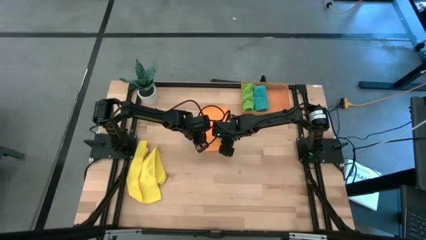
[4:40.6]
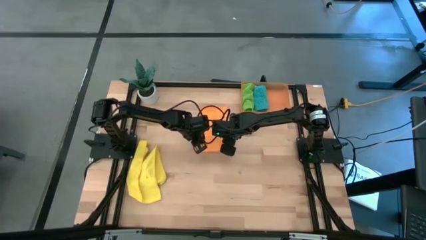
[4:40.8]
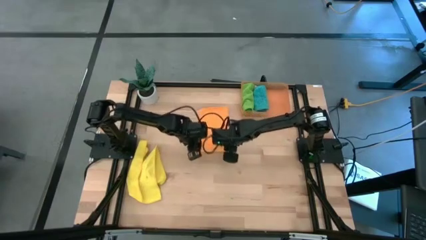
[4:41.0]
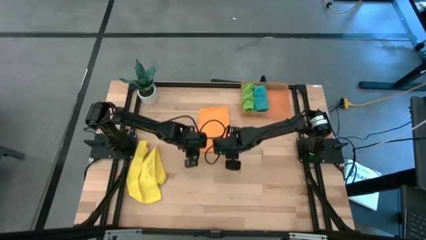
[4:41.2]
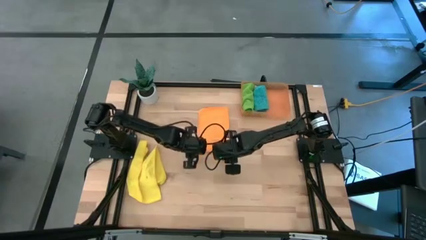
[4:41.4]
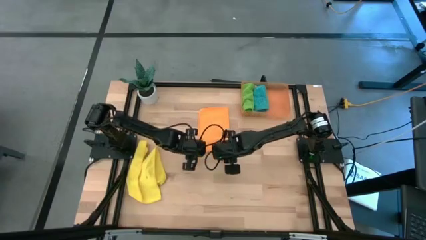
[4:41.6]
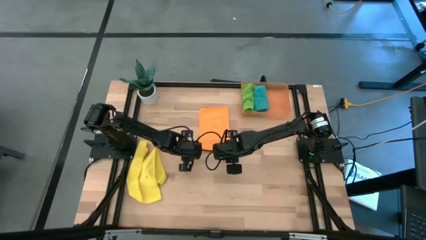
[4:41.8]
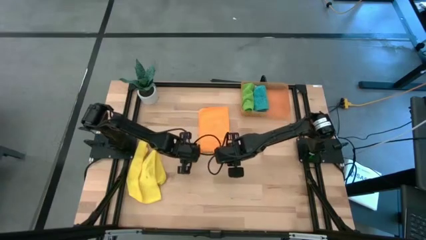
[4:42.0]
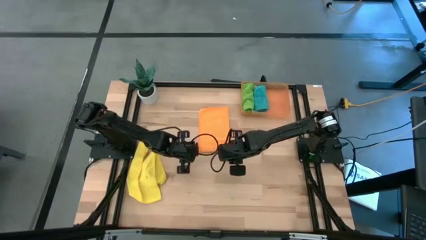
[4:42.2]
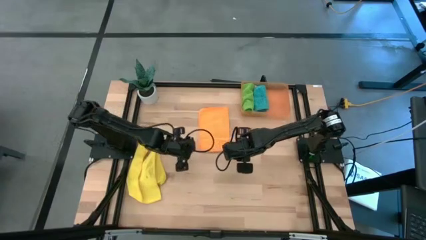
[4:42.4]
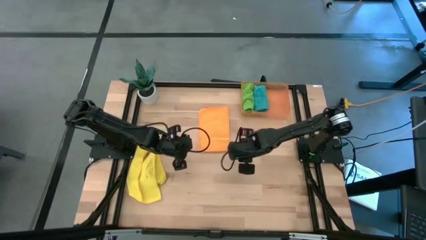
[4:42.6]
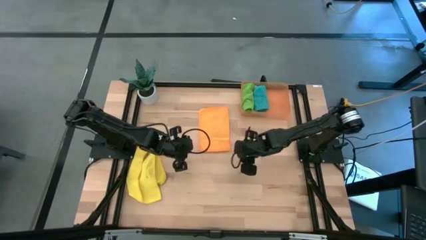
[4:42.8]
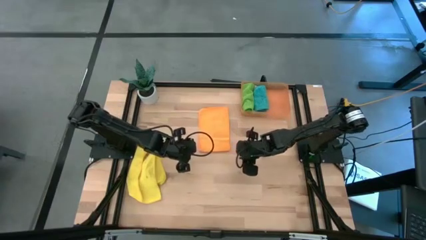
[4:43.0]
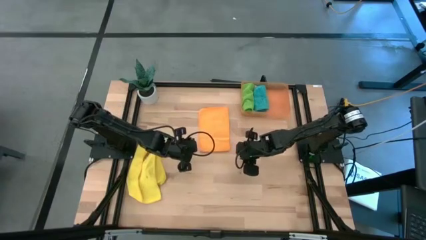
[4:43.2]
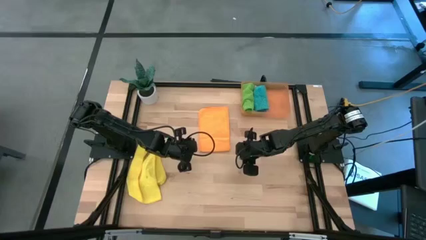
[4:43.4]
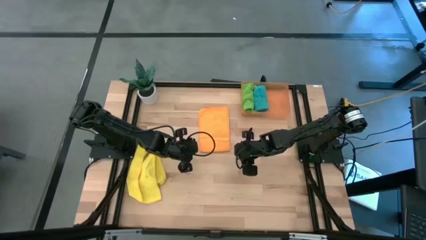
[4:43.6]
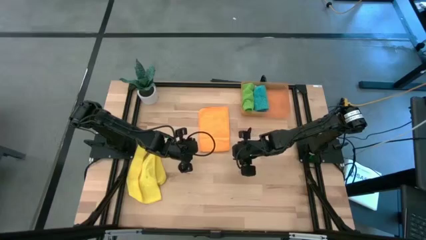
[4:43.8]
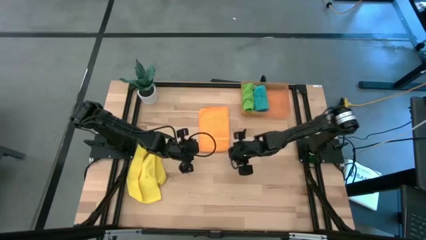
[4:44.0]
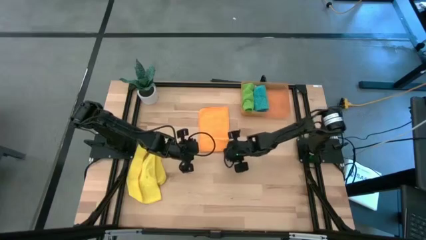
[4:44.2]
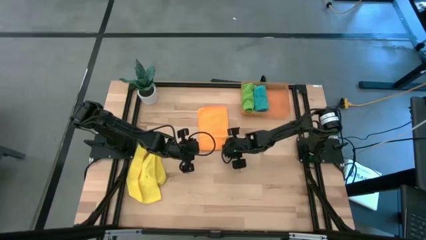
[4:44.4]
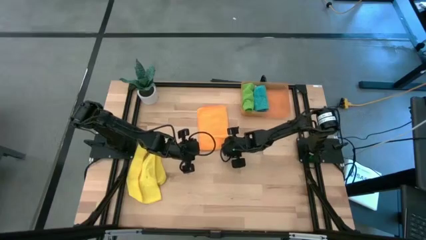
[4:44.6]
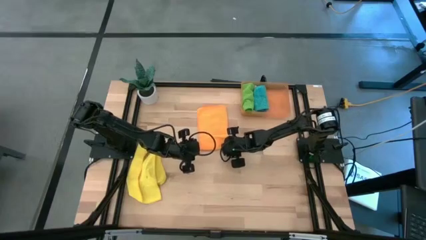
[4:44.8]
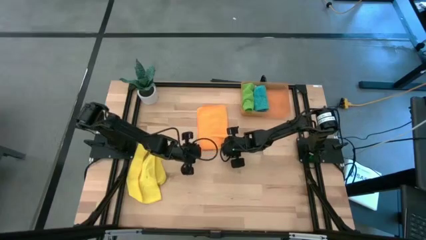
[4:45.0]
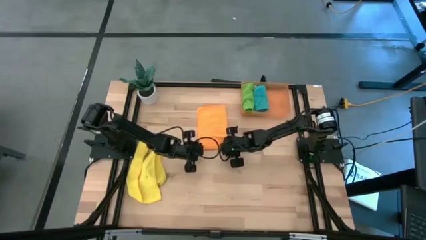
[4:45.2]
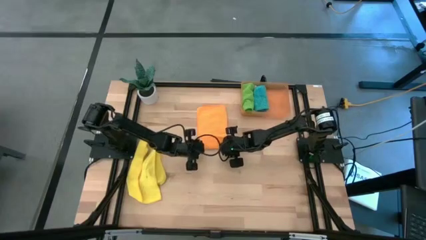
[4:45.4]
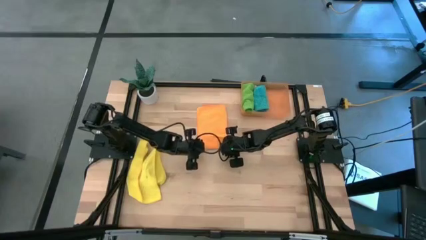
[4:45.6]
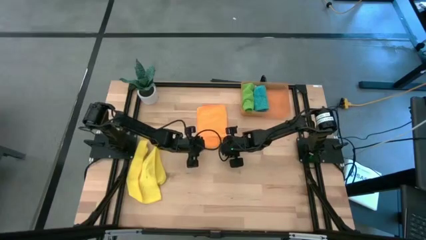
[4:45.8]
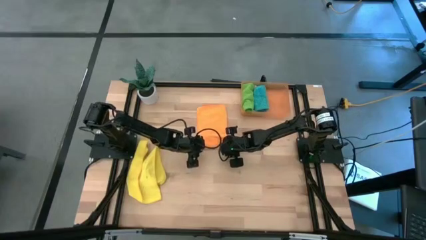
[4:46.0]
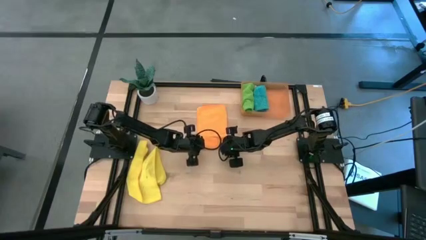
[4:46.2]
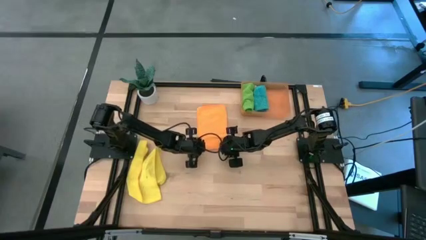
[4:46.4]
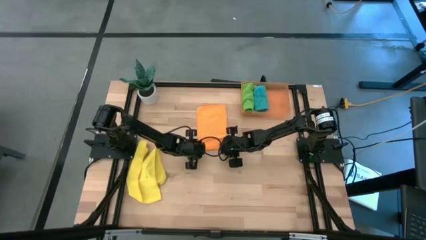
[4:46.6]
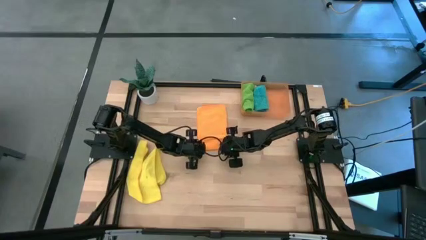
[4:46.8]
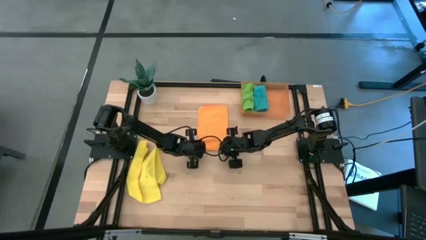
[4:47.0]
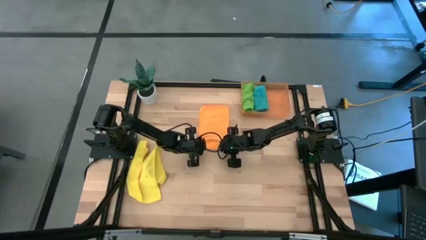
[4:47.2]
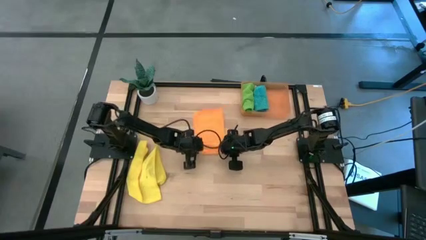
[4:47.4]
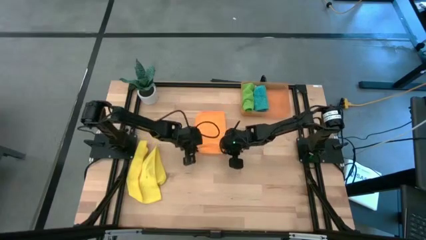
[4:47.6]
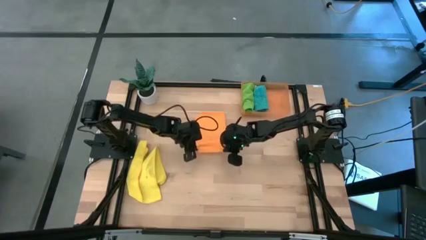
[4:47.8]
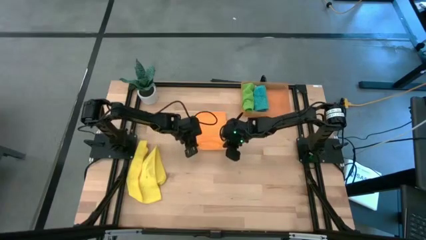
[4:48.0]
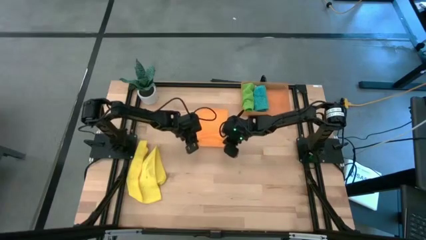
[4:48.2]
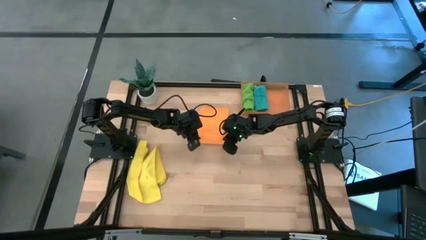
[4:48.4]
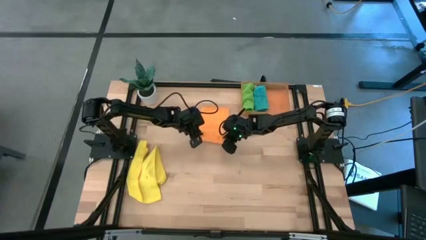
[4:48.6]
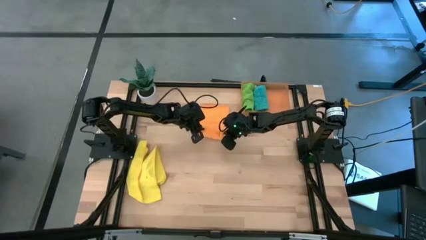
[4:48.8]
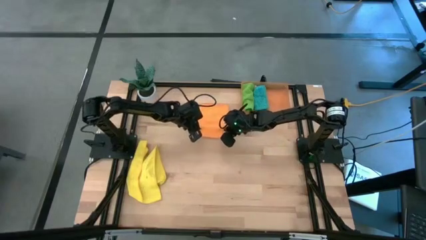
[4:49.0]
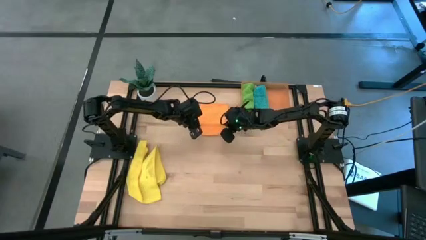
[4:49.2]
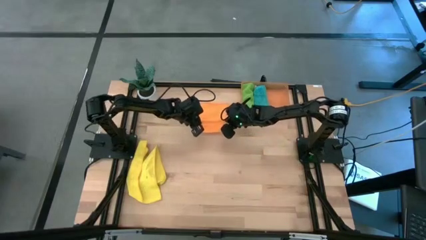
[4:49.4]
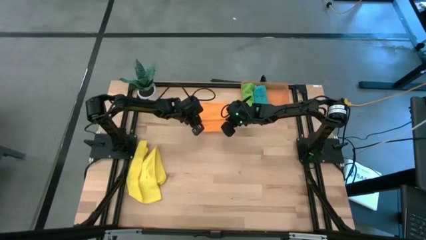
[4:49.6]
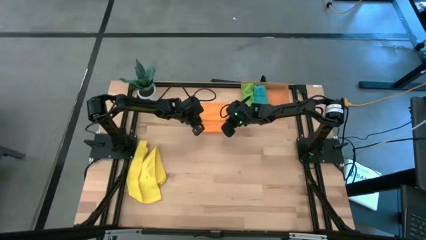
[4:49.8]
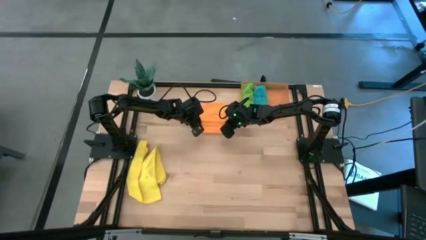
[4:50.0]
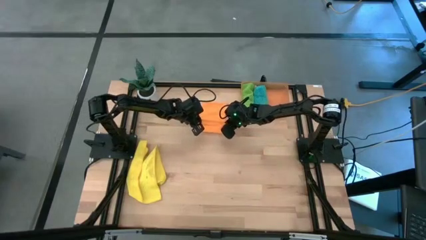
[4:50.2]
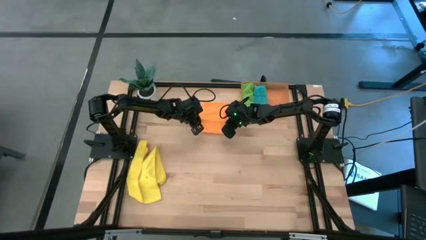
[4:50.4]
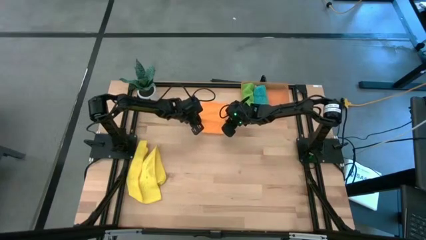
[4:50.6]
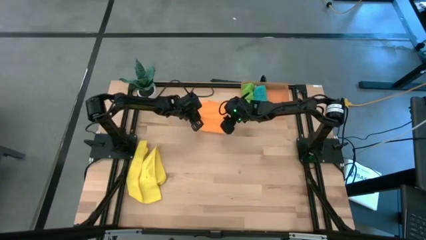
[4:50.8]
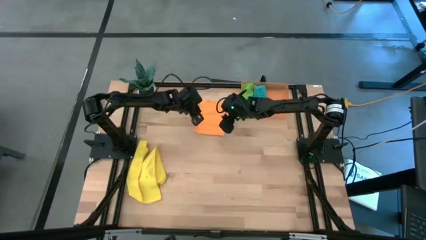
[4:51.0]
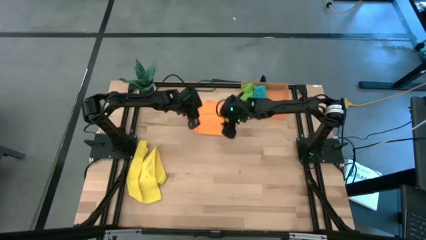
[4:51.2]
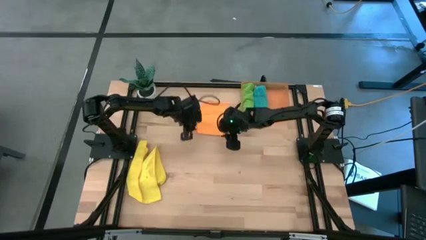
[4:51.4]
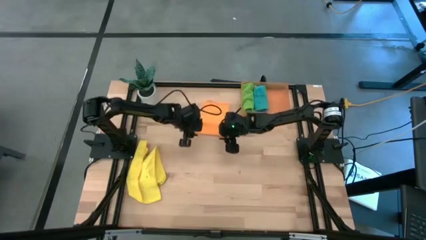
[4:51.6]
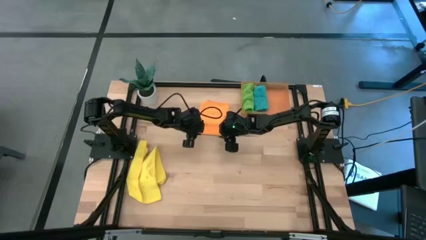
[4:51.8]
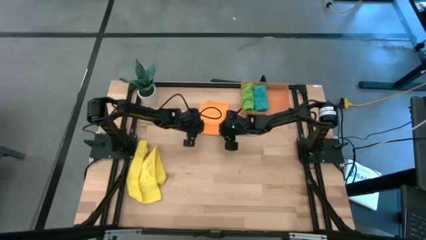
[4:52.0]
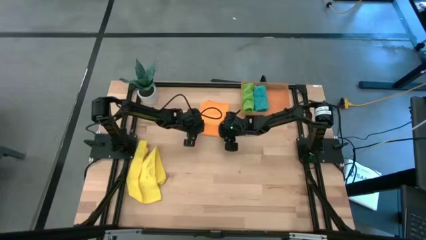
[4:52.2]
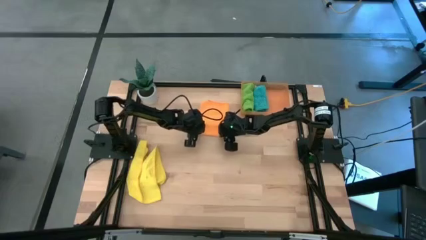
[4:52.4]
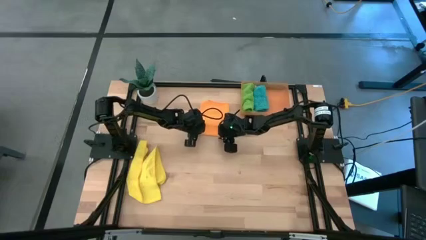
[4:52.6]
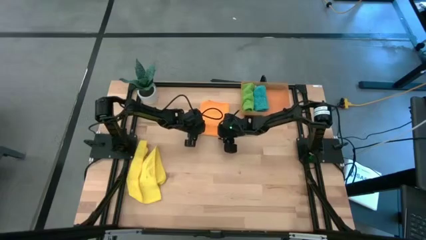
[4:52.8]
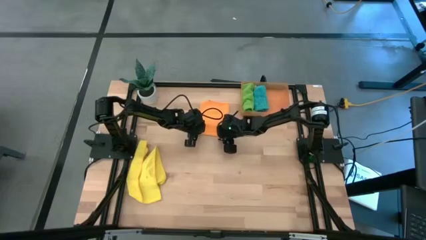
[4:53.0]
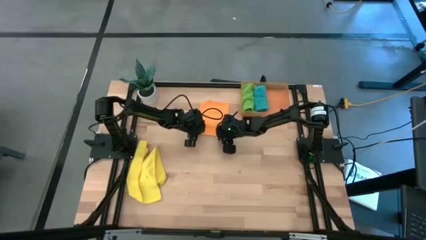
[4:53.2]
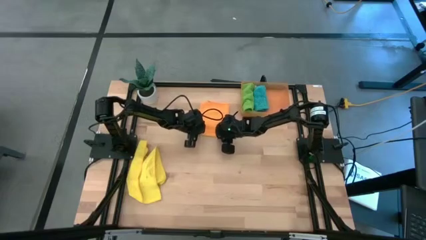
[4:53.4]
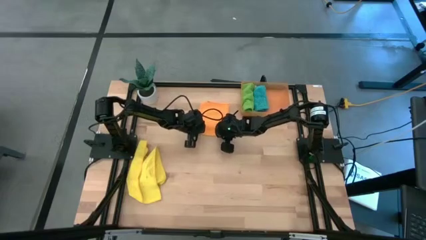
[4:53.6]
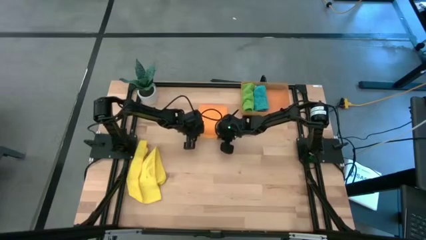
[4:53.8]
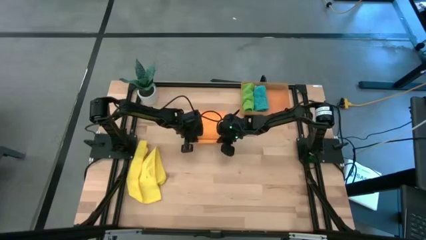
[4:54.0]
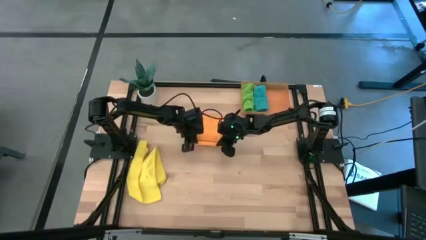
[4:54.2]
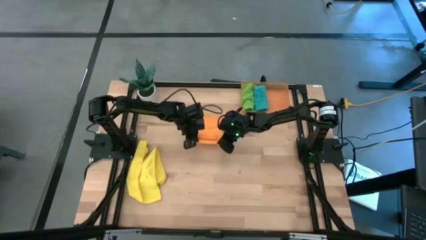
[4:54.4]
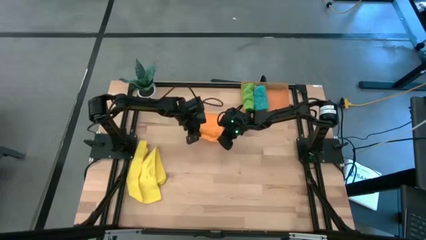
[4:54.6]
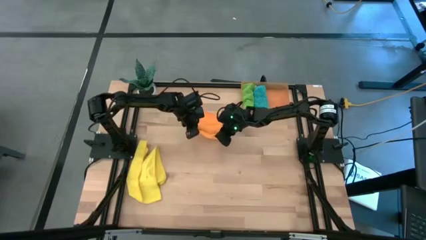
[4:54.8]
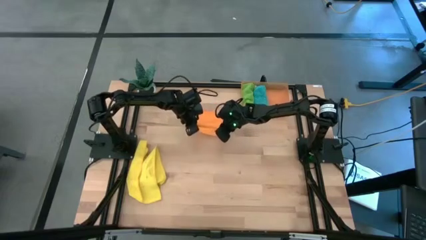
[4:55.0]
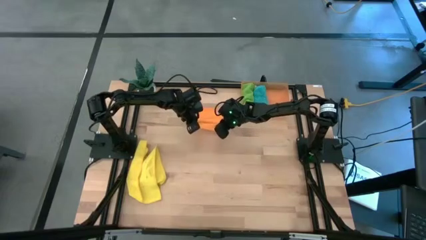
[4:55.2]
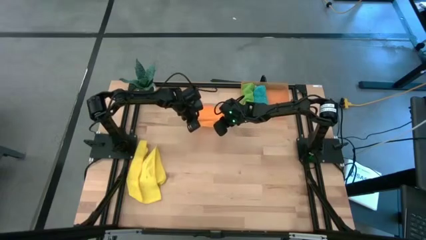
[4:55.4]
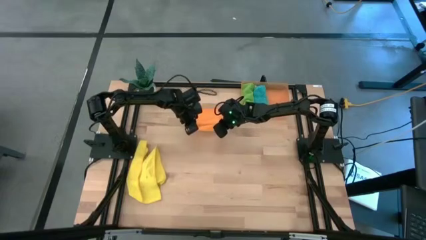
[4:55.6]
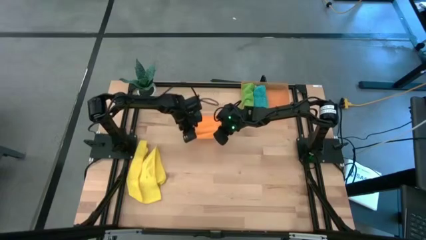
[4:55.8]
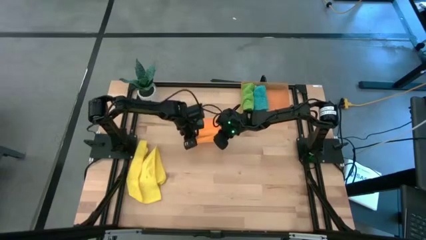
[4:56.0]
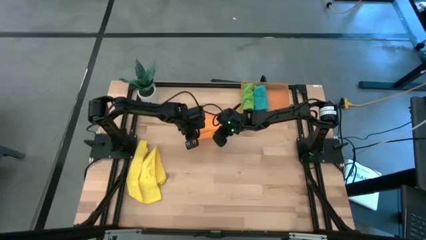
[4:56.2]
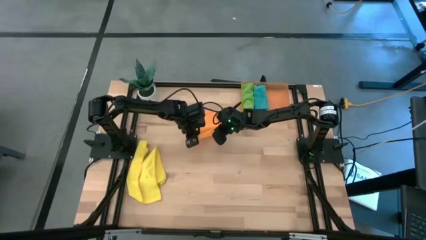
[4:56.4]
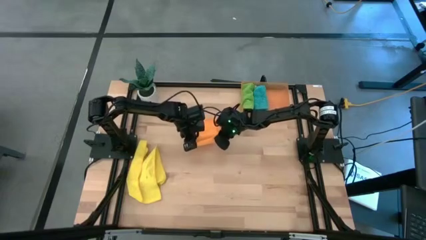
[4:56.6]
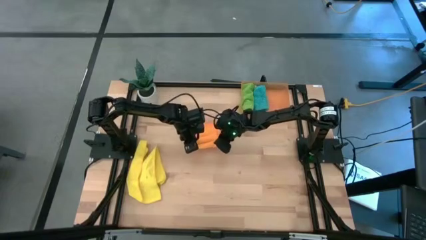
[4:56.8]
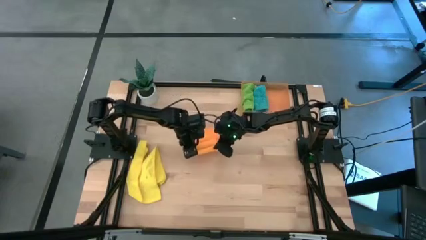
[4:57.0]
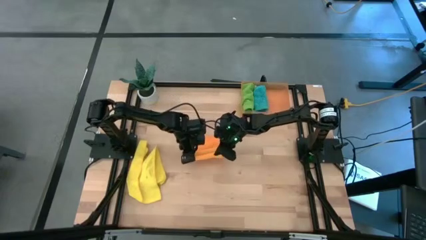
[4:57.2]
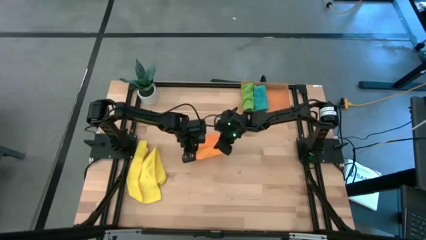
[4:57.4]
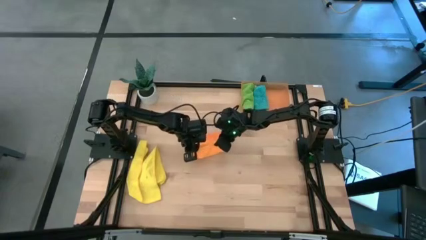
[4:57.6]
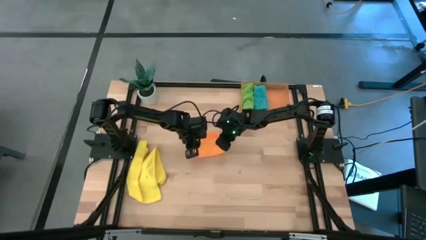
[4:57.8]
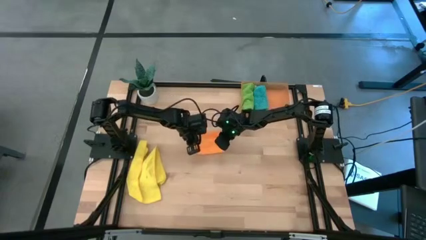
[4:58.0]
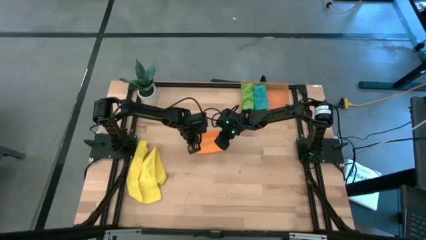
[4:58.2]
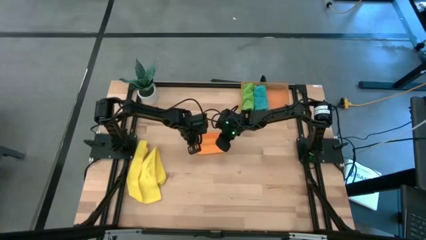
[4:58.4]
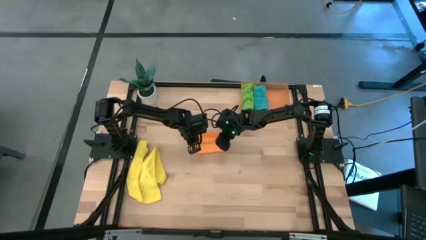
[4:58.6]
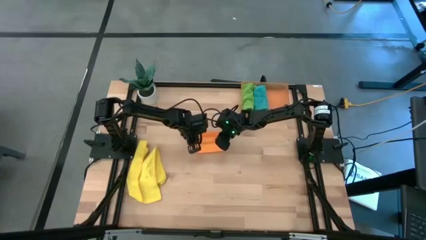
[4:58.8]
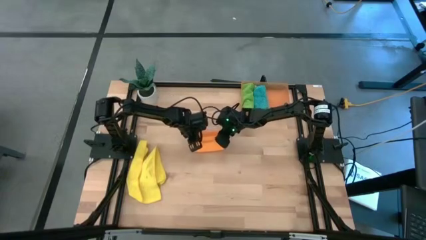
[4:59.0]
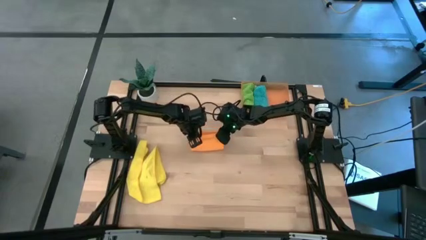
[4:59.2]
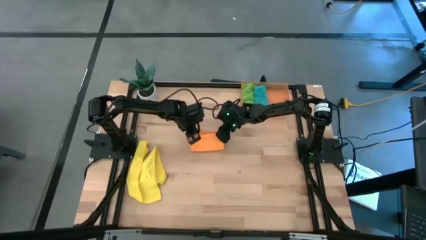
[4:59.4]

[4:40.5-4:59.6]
Task: Roll microfiber towels into tight, uniform cylinder then place into a basket
Fold the orange towel
